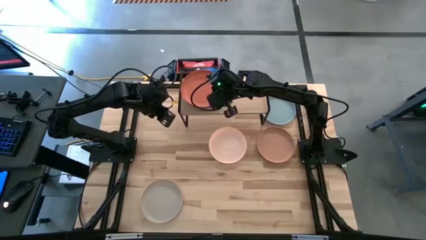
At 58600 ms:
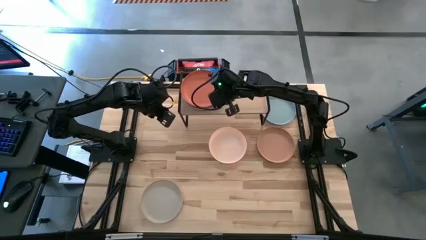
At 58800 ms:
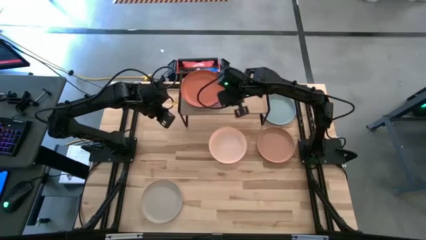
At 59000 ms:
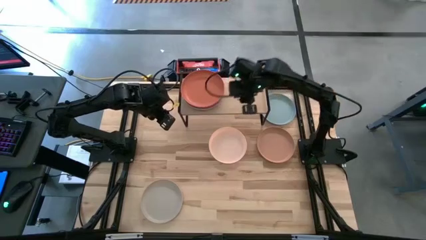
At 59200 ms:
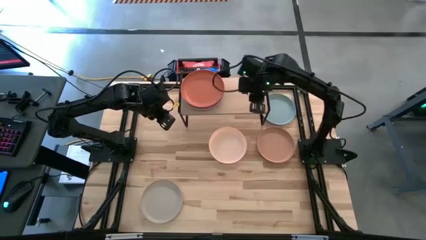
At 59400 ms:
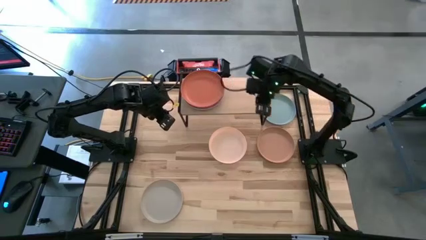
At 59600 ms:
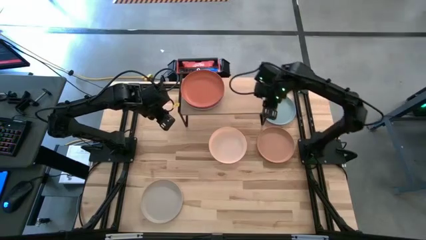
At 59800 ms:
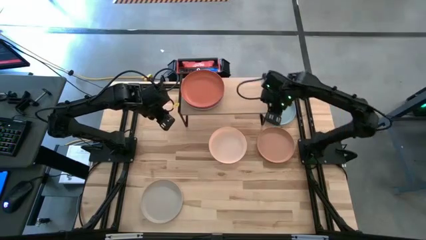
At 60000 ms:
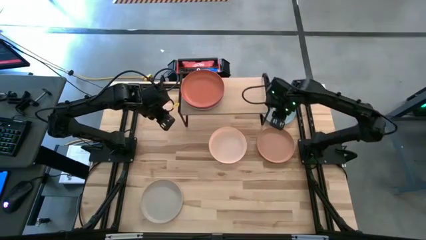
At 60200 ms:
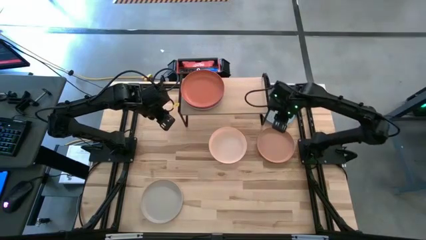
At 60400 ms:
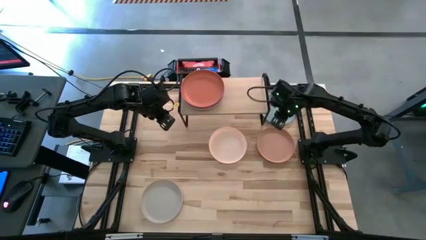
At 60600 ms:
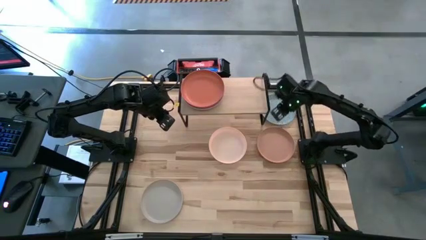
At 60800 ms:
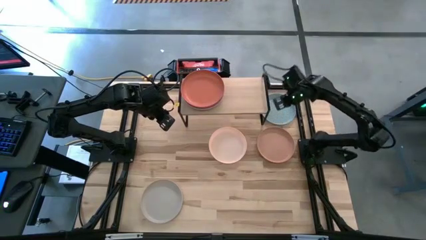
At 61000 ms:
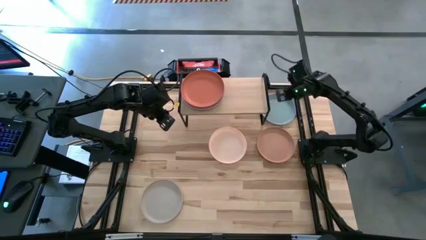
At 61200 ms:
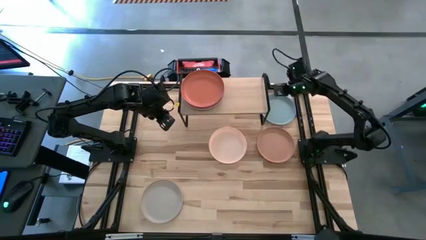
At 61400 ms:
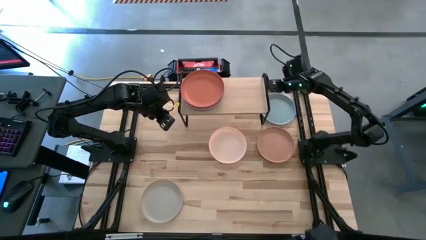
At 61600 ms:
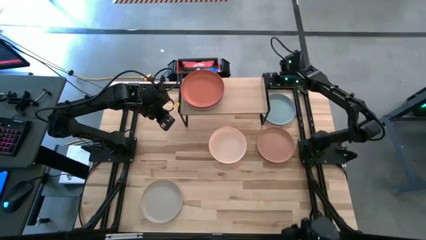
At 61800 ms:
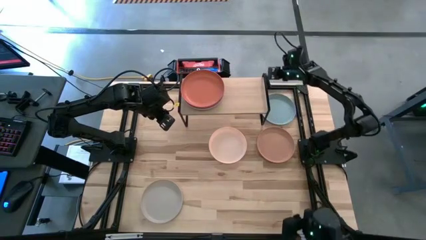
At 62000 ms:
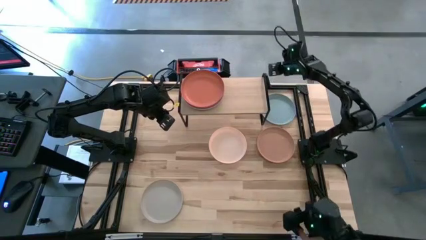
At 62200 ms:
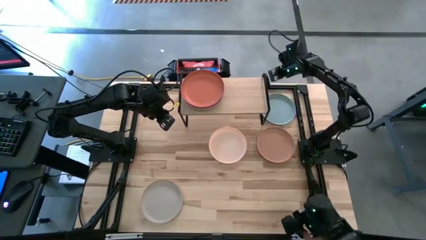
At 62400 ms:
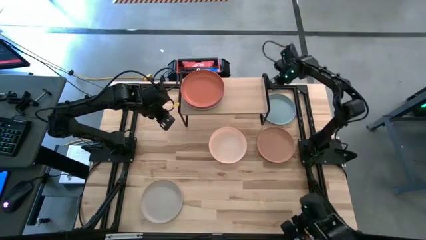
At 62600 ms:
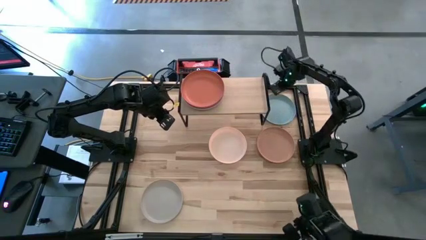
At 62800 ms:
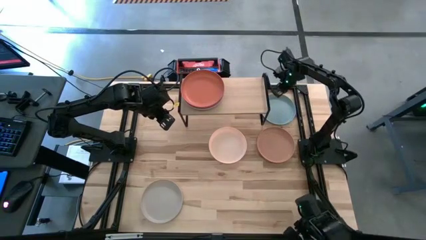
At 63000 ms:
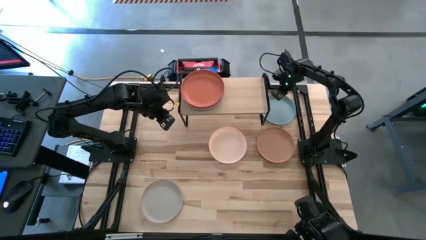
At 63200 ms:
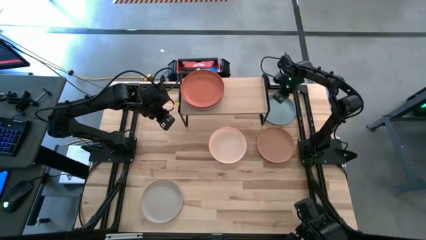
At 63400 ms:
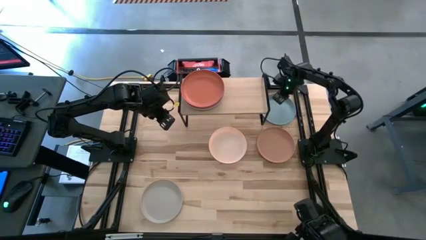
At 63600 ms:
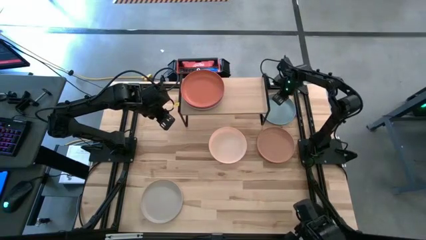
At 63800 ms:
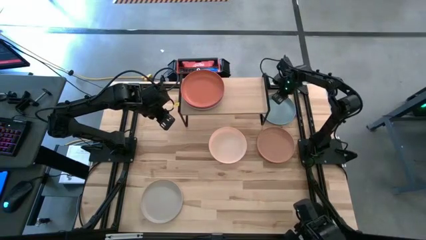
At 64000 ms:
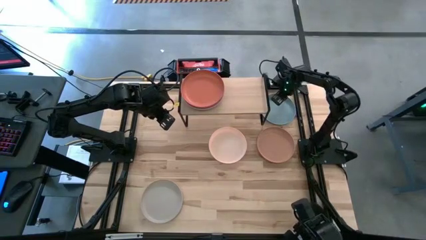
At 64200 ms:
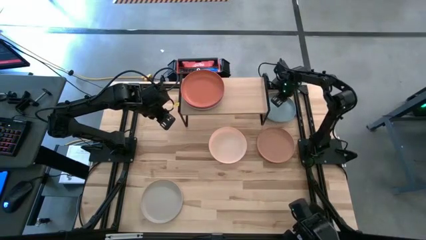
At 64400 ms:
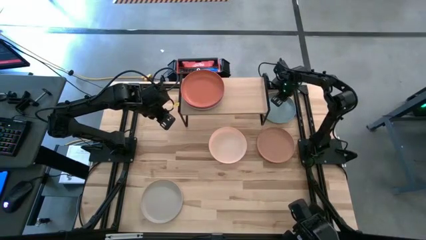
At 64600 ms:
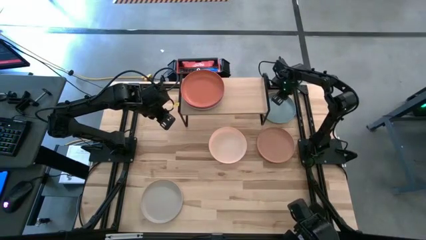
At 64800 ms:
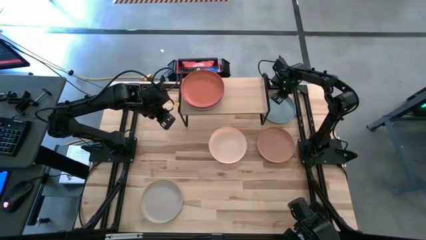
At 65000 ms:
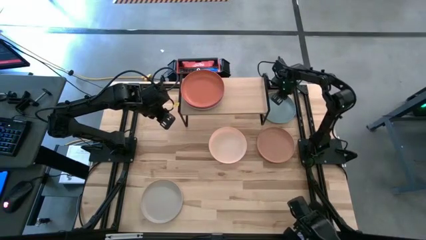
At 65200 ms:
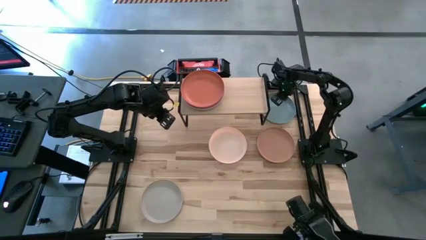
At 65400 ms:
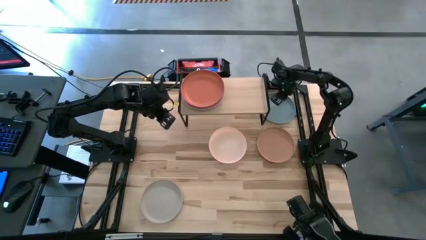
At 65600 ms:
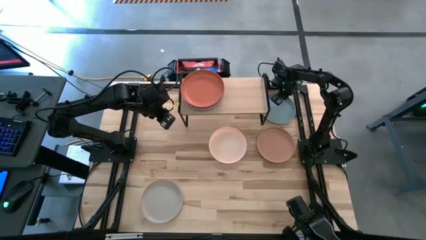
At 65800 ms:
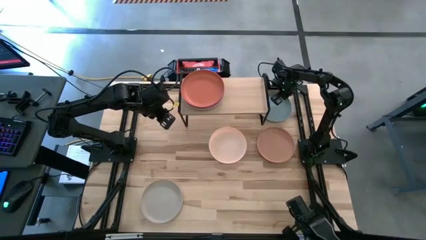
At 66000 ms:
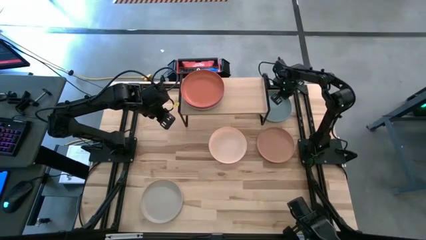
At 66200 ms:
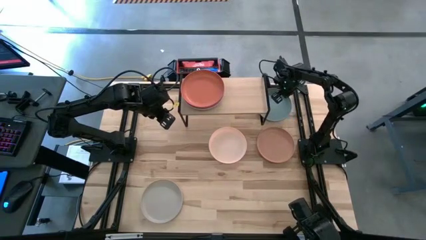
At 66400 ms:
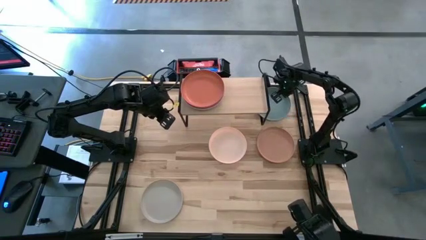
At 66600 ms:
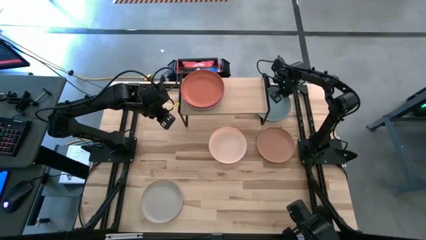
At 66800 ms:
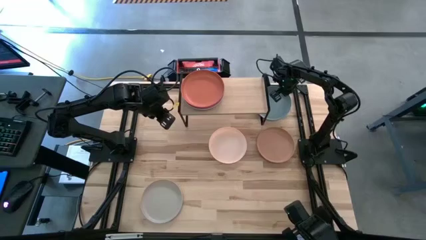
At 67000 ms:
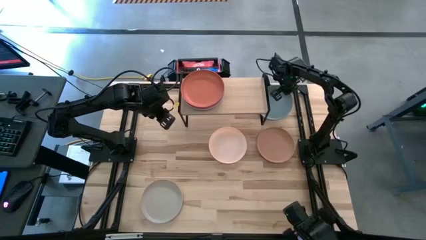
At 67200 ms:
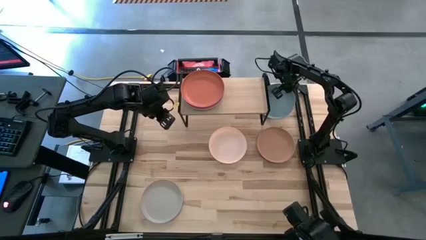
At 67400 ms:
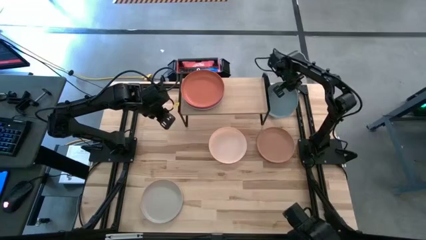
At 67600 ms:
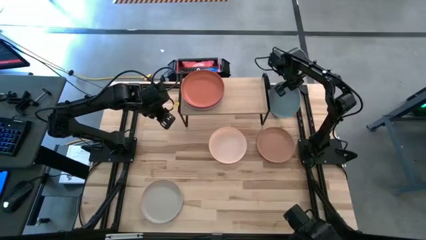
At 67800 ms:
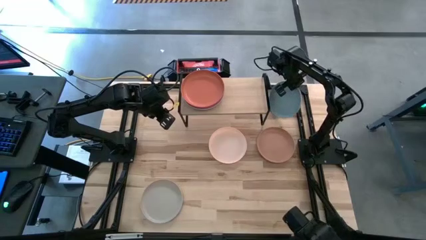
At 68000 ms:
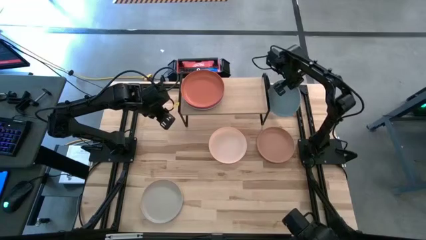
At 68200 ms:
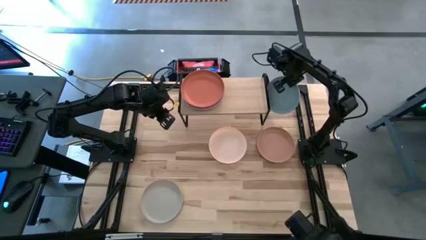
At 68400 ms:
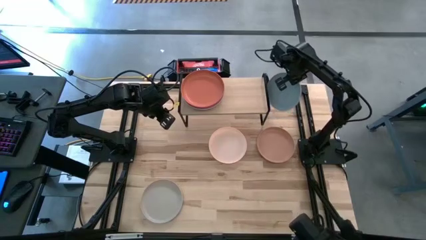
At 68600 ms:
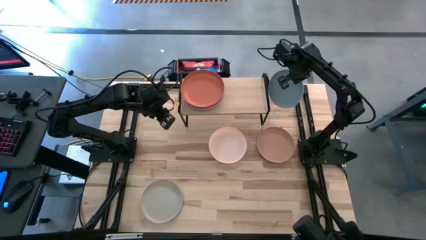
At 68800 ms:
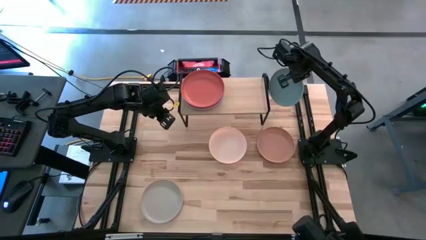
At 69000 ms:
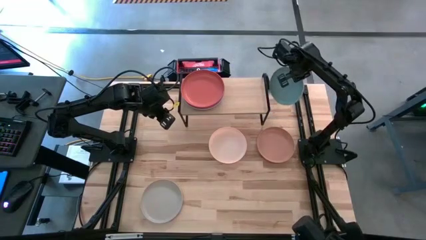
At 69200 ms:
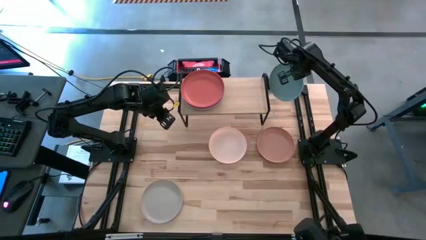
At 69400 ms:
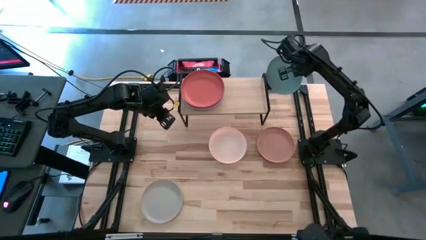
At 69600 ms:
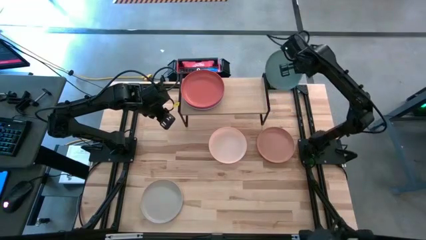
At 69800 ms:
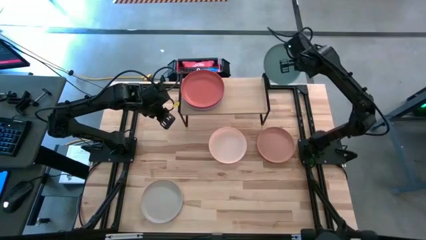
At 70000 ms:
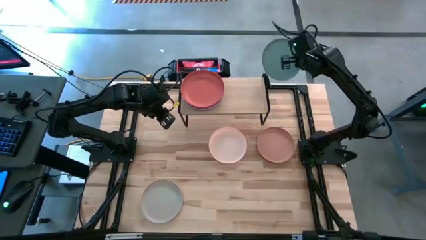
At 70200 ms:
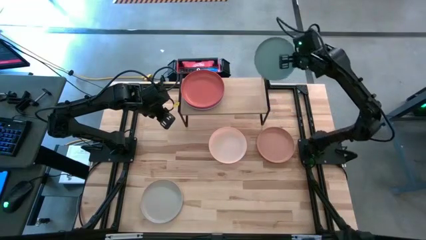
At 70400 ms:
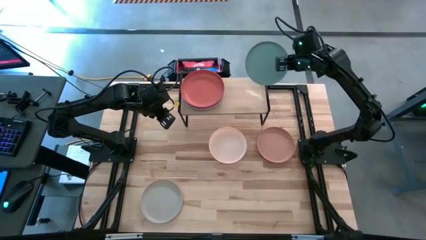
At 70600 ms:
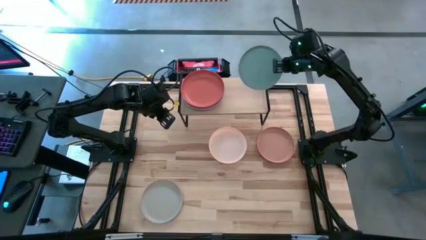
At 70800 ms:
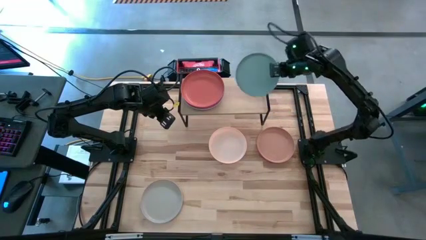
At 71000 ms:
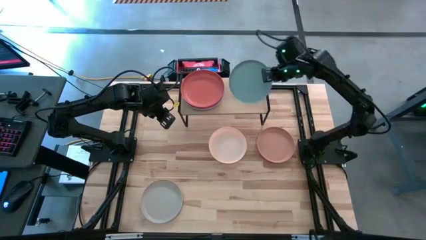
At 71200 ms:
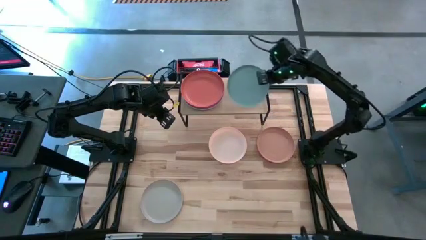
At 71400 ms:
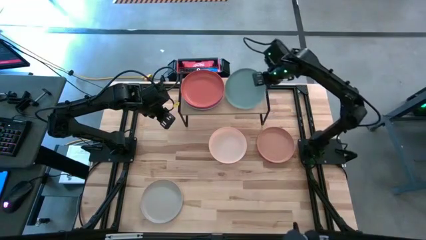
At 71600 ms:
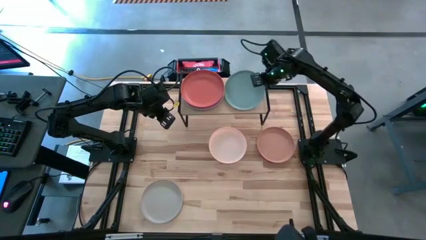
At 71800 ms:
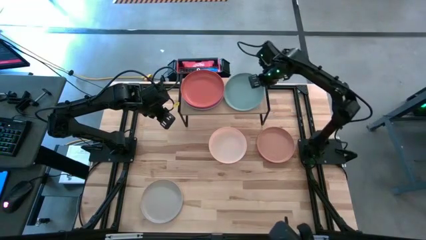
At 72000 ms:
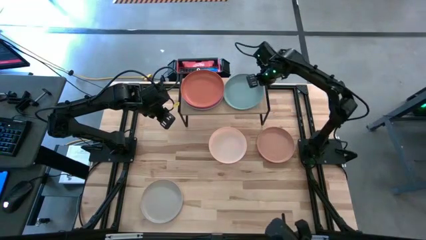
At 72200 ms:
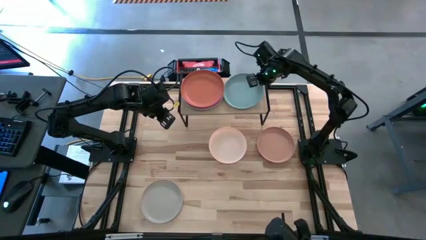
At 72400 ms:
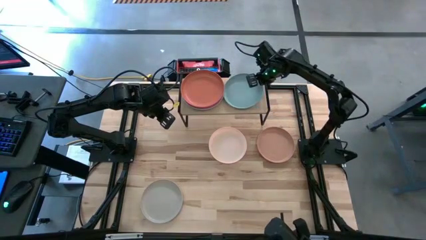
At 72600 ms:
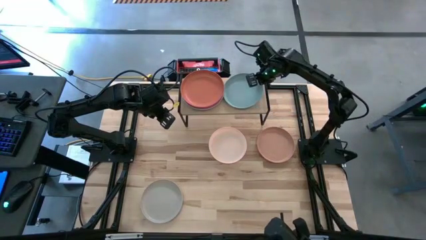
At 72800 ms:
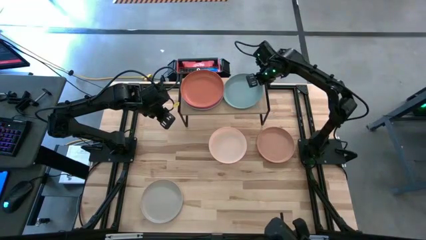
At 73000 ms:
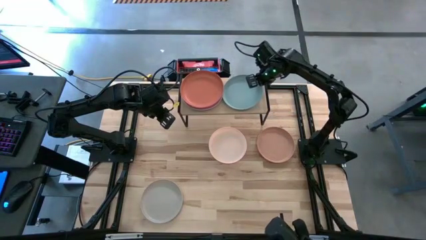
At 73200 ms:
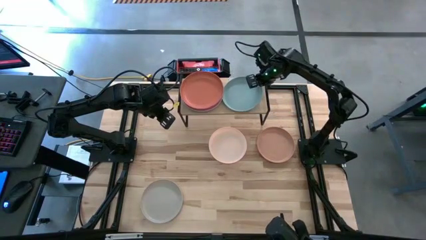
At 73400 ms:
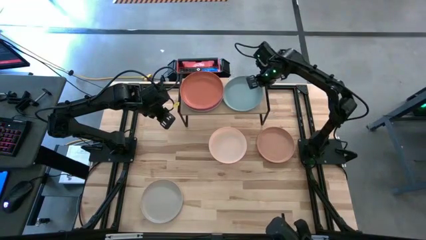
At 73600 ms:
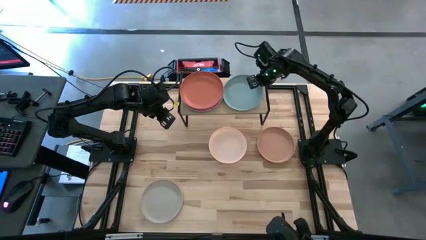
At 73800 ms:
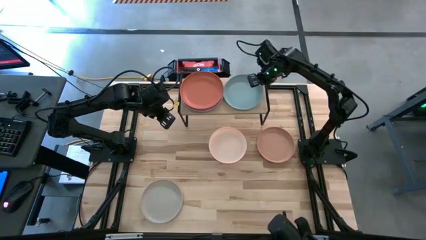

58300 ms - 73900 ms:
Task: Place and stack plates onto a shelf
Put the light blue plate on the shelf
